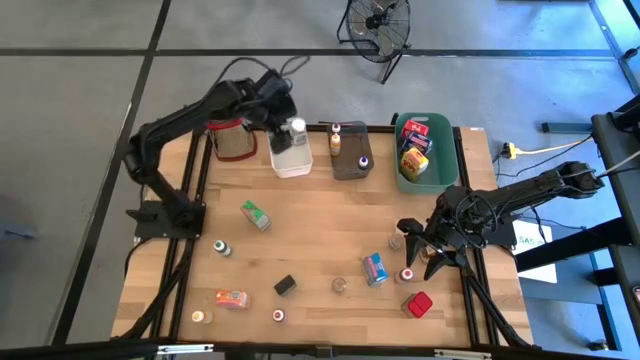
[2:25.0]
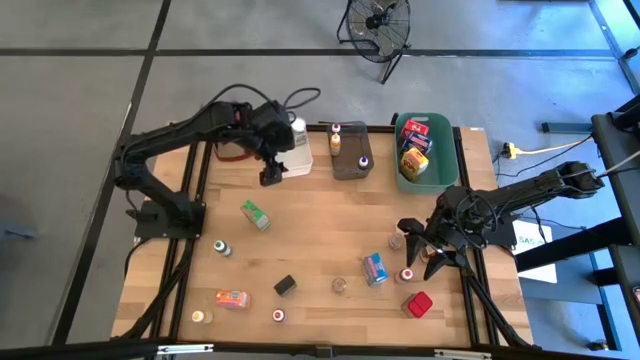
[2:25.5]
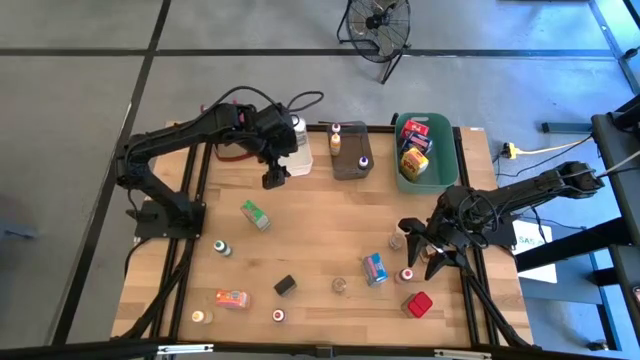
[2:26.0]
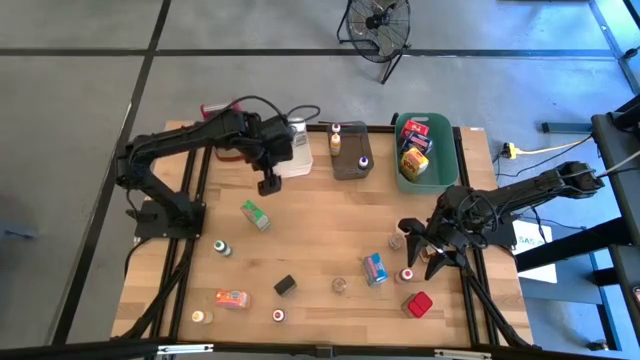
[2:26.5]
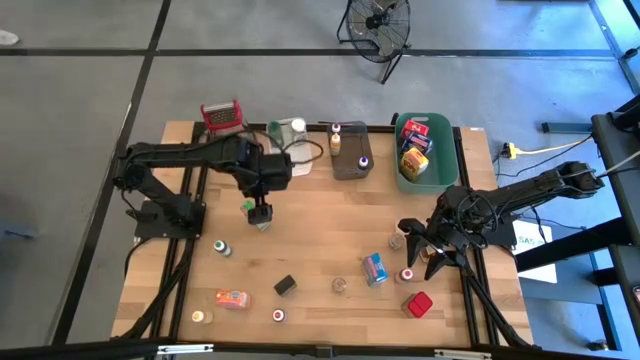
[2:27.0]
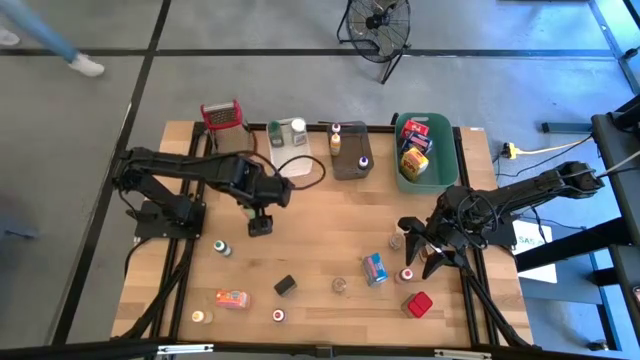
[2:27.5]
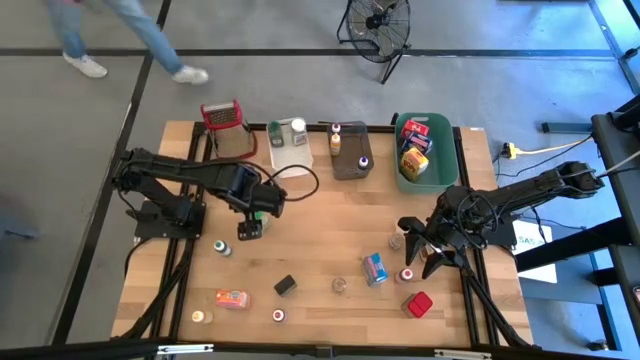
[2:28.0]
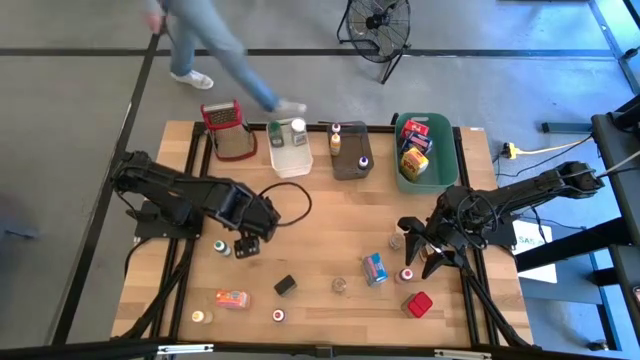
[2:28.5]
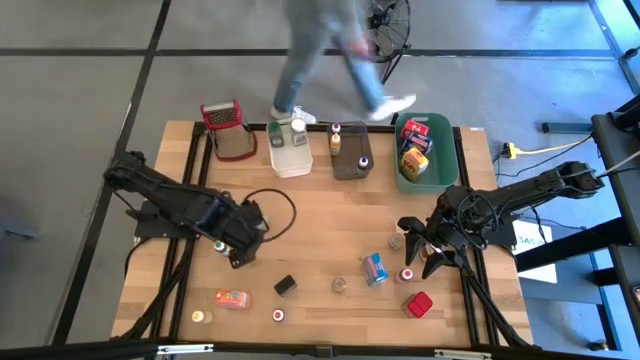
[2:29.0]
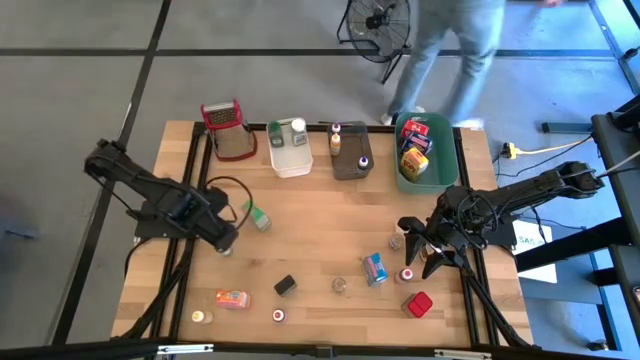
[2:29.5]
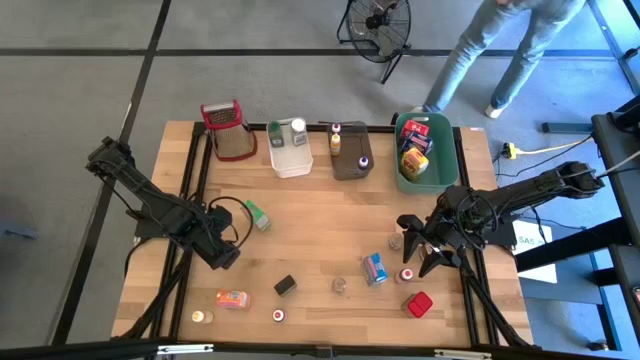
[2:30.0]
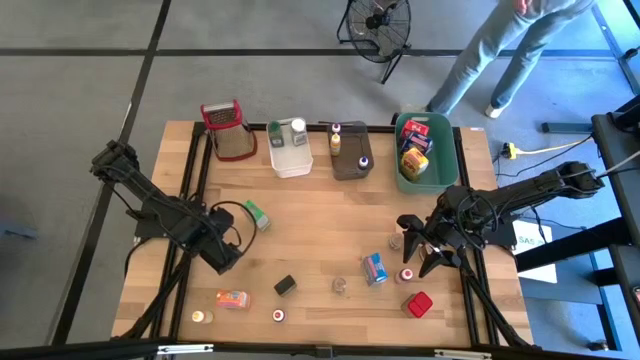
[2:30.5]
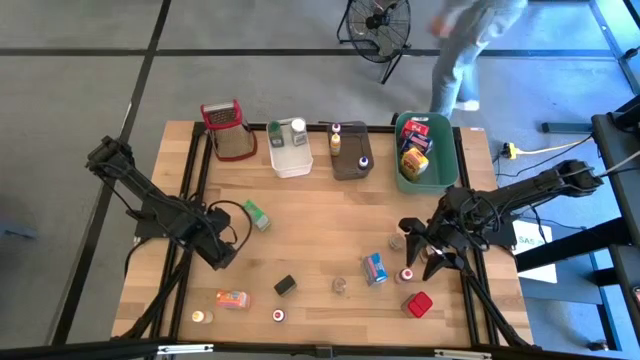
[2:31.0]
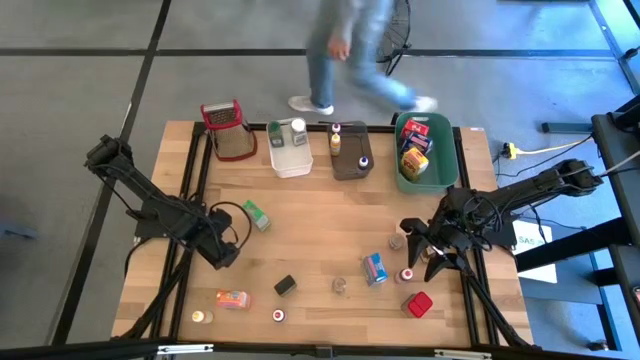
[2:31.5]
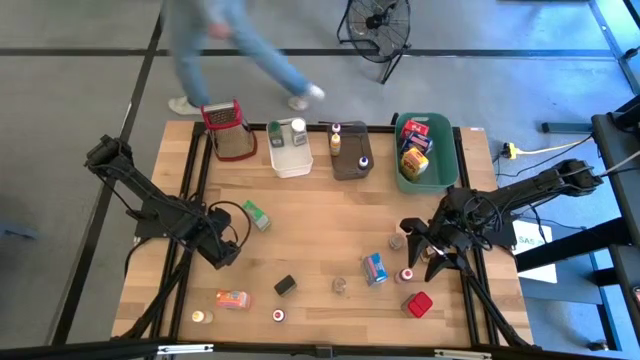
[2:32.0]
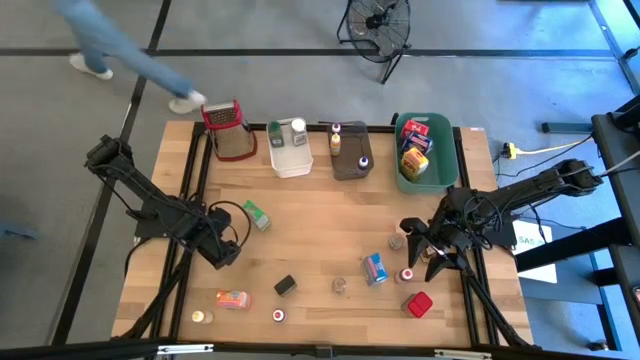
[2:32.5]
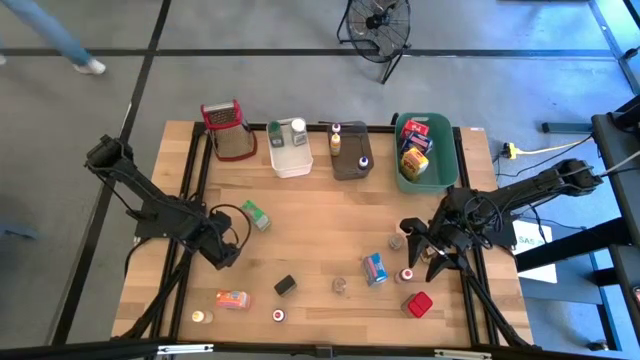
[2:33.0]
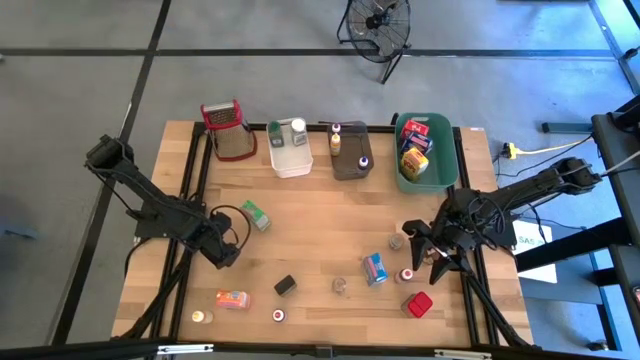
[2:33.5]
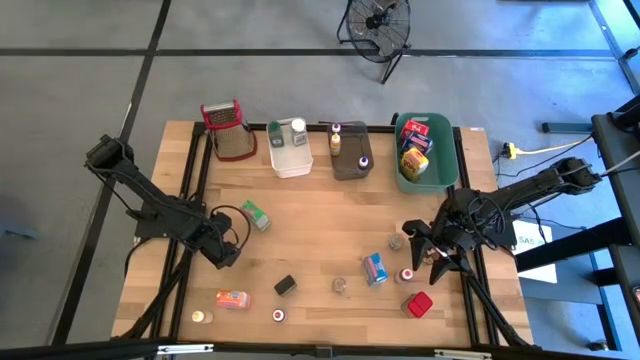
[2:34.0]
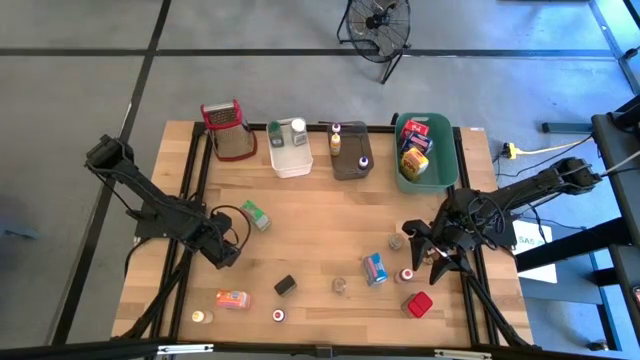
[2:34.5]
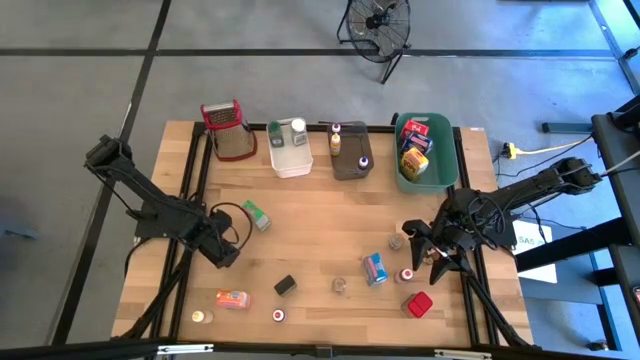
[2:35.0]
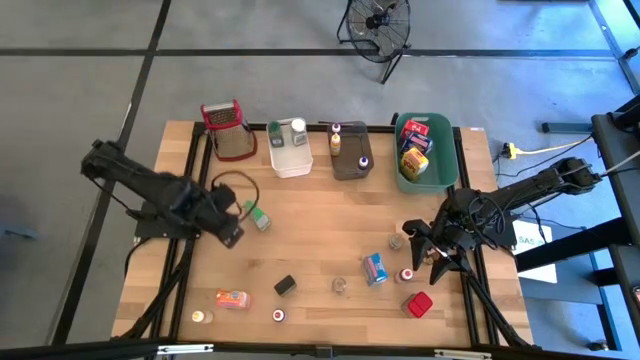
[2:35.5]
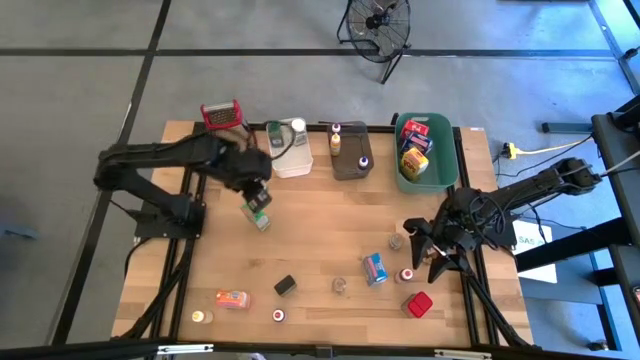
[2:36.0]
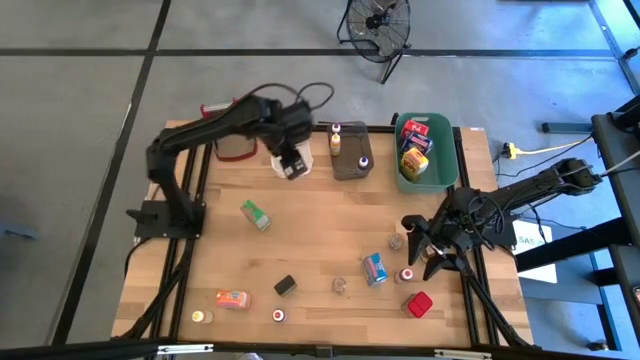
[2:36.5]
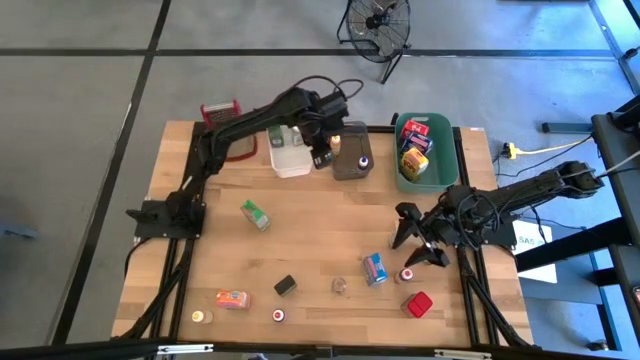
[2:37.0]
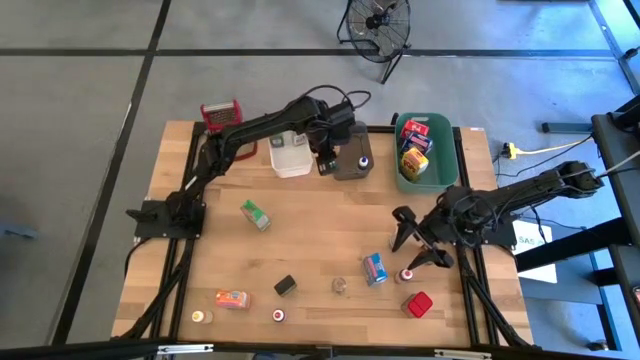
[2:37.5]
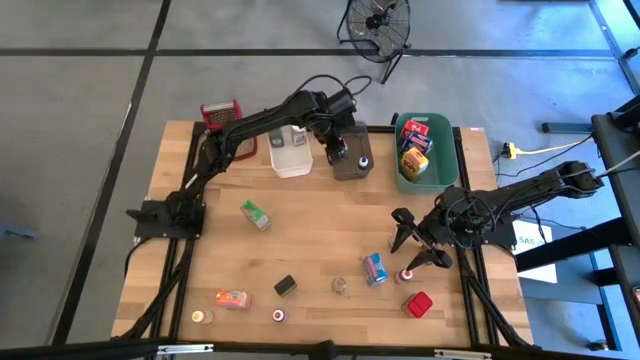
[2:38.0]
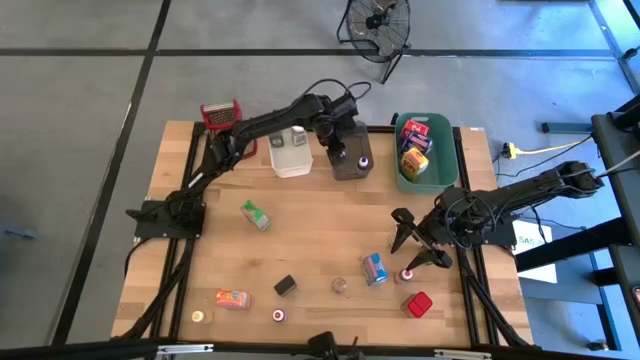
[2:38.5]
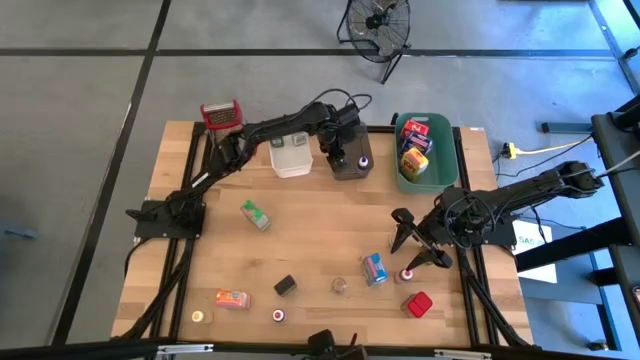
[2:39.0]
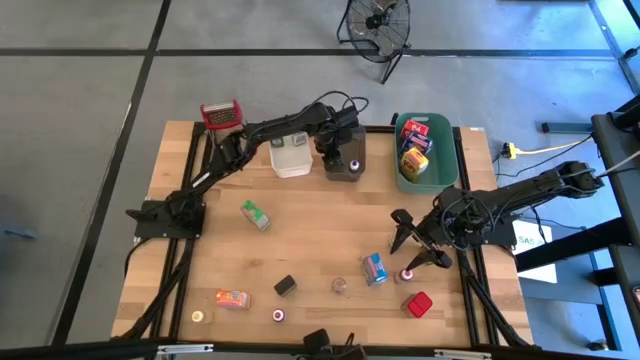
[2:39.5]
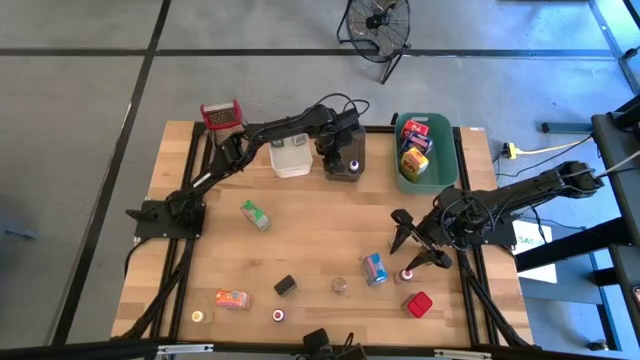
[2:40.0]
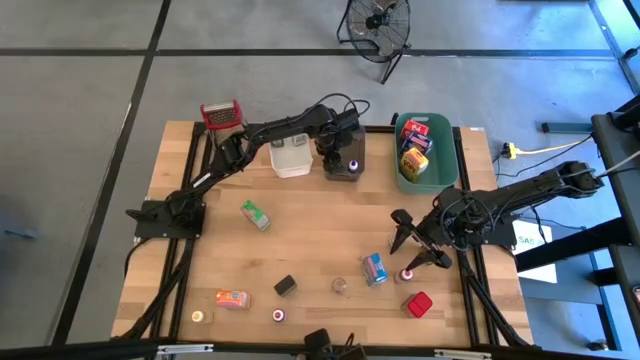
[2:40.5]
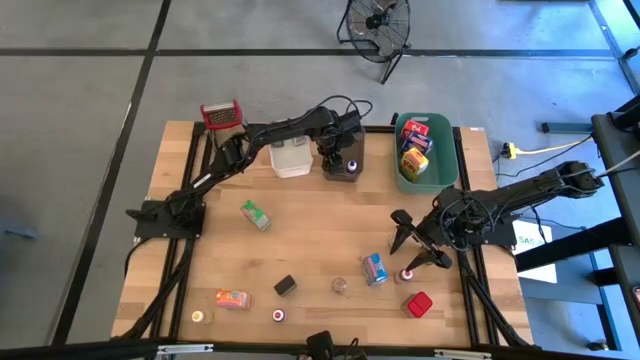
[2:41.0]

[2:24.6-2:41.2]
Task: Pick & Place Kitchen Items
Put the green coloring bottle into the black transparent bin

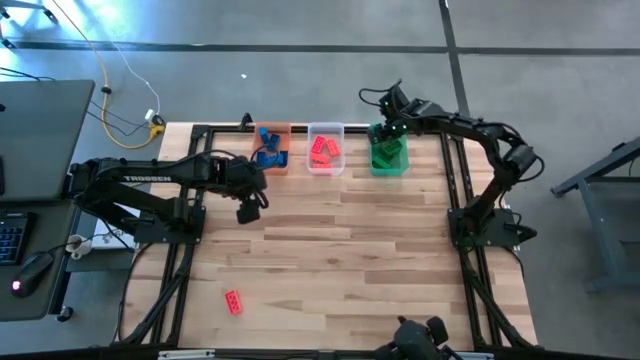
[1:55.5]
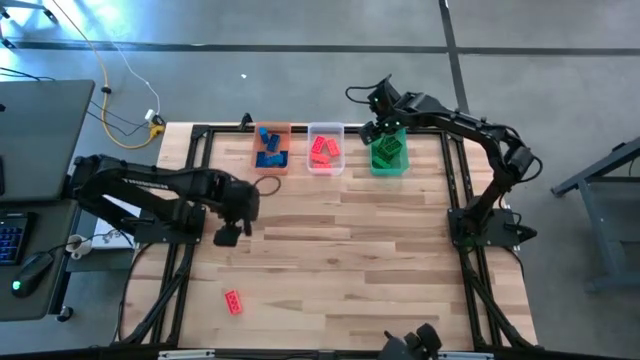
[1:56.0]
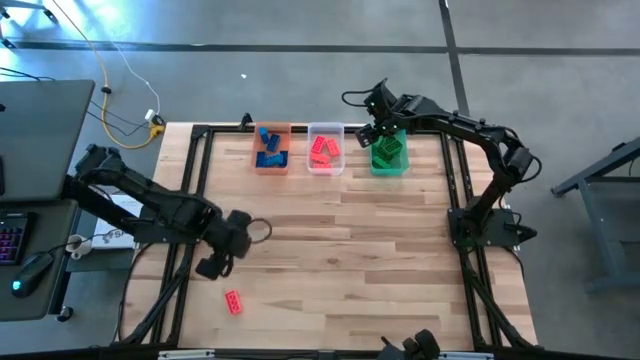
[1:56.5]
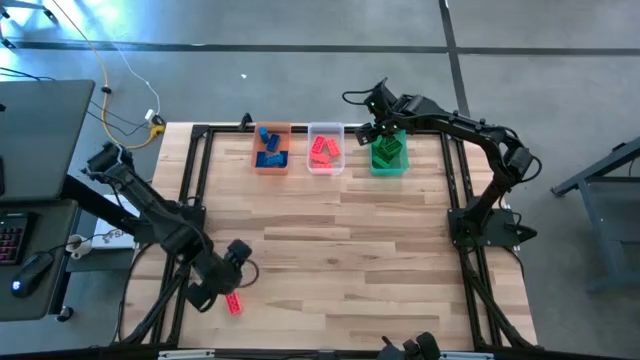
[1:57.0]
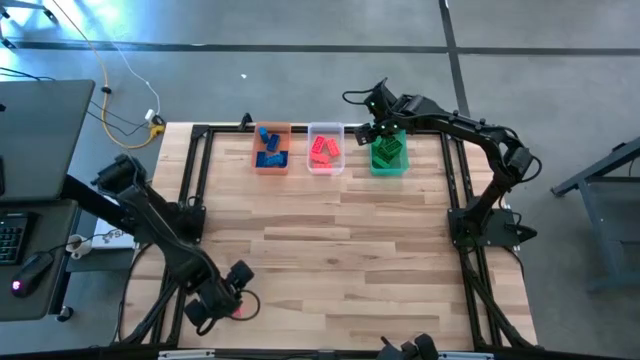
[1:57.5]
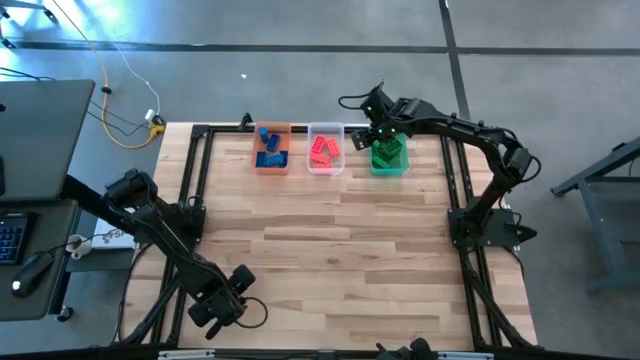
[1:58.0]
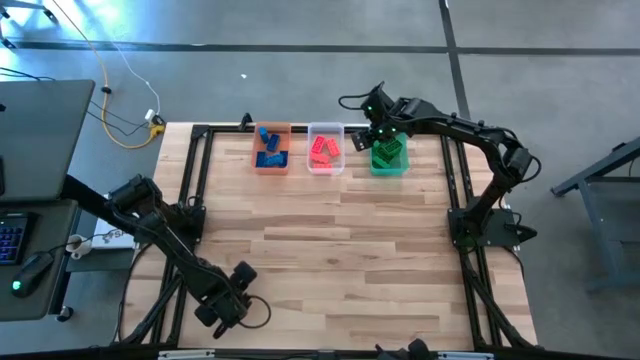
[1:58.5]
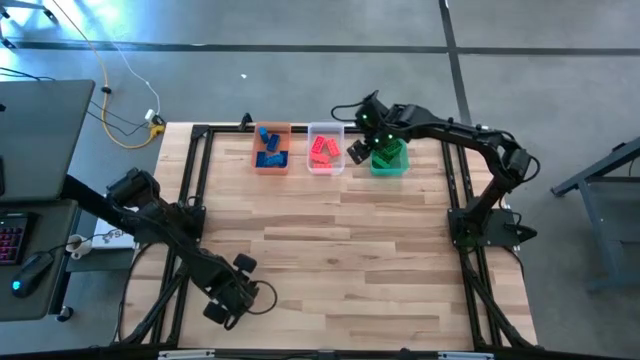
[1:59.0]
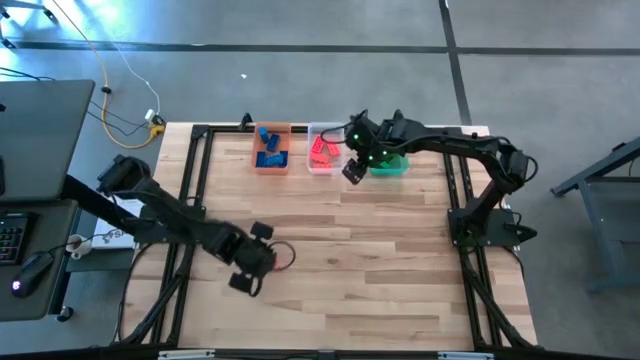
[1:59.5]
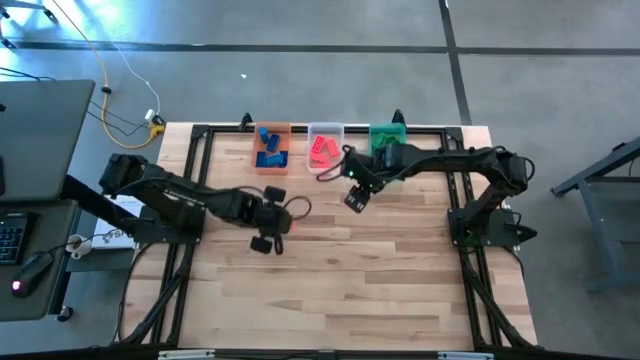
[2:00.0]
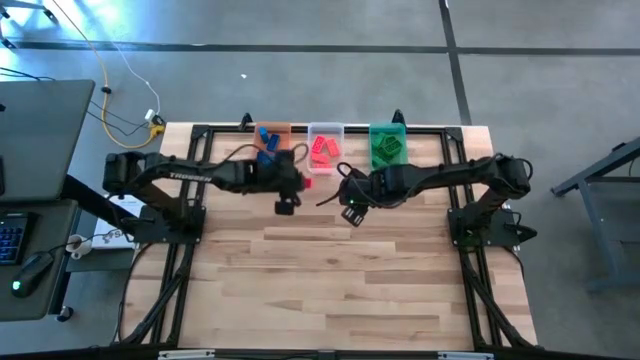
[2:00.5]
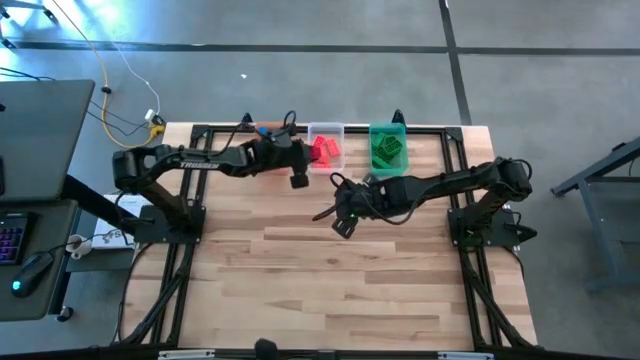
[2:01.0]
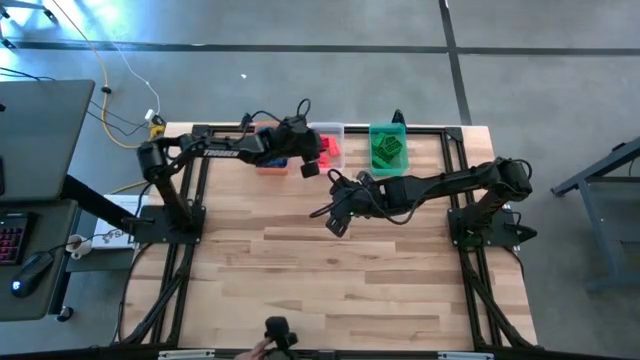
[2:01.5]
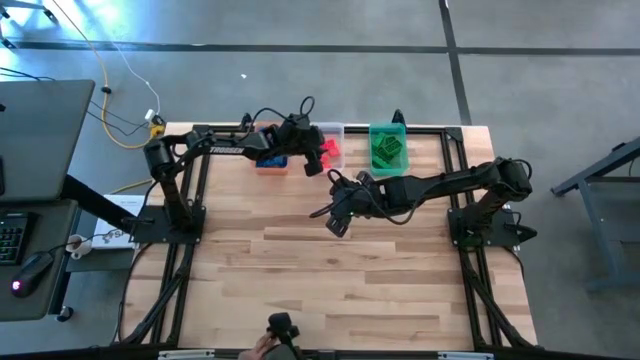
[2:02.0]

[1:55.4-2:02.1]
Task: Sort & place blocks by color
Put the orange game piece into the white bin
